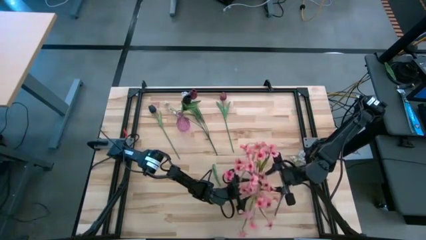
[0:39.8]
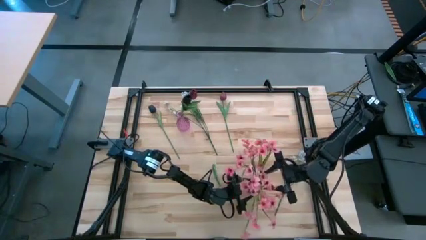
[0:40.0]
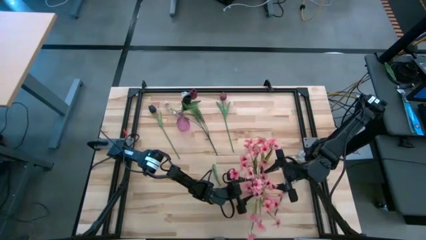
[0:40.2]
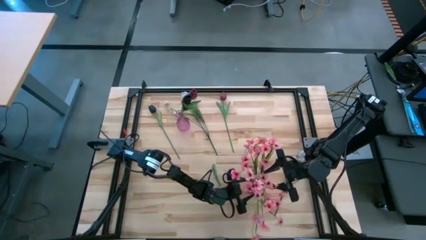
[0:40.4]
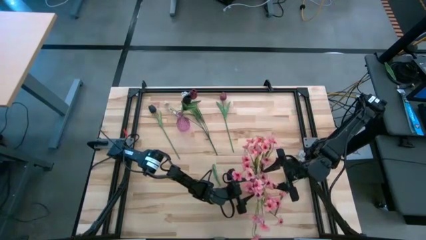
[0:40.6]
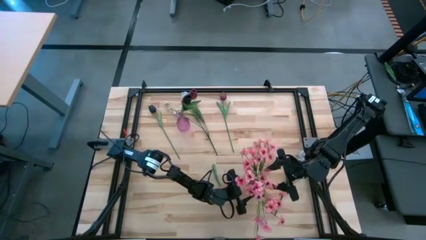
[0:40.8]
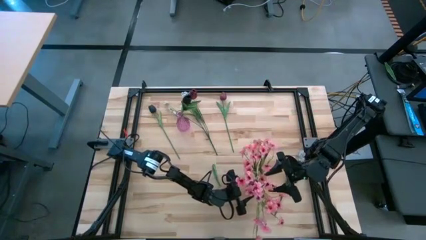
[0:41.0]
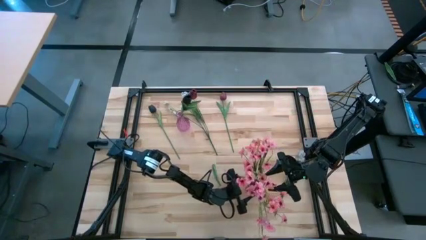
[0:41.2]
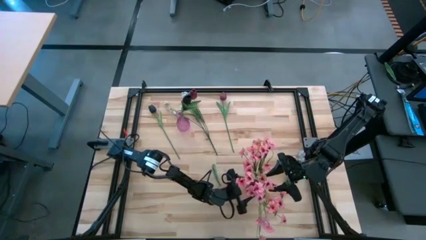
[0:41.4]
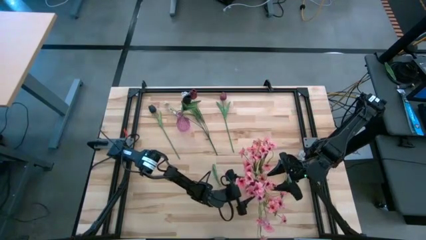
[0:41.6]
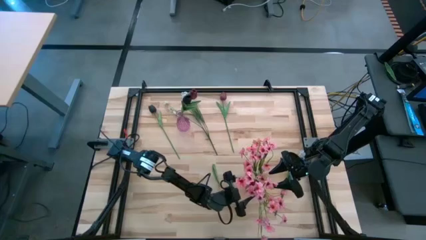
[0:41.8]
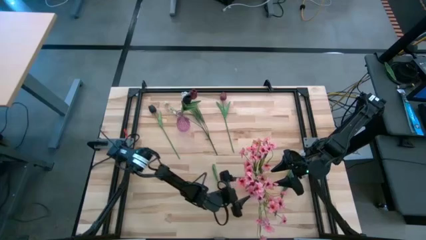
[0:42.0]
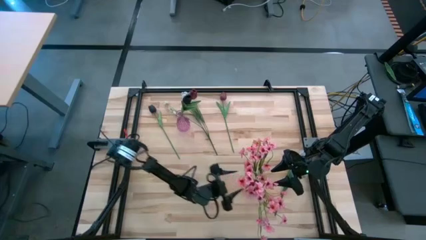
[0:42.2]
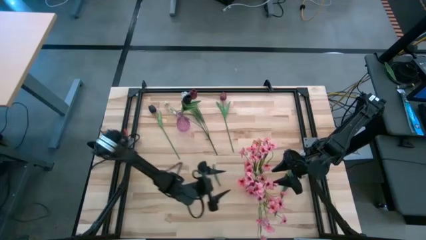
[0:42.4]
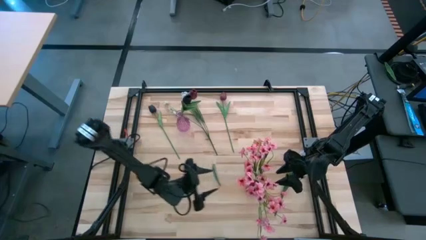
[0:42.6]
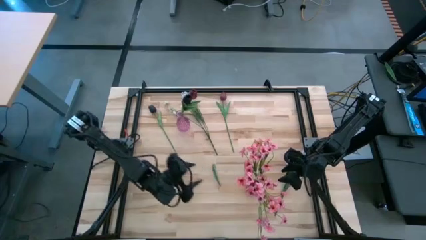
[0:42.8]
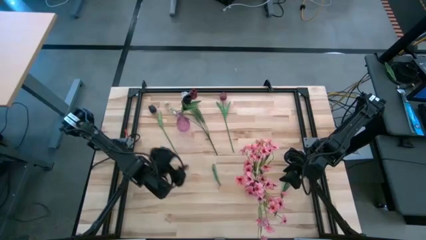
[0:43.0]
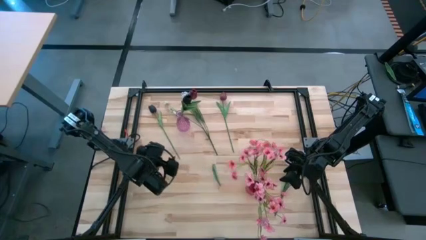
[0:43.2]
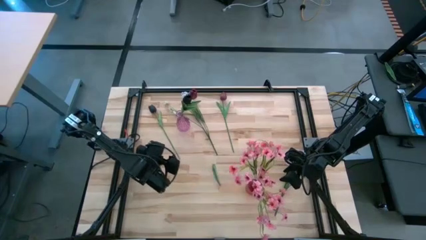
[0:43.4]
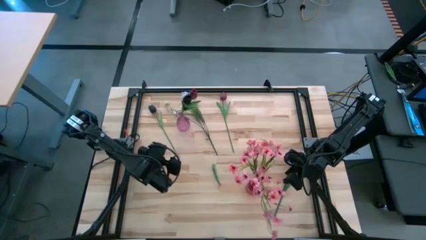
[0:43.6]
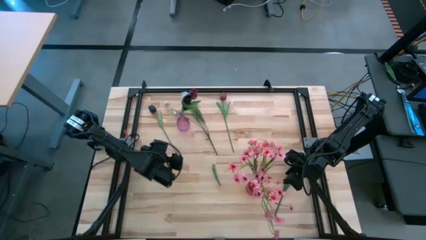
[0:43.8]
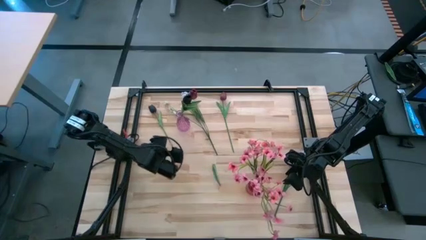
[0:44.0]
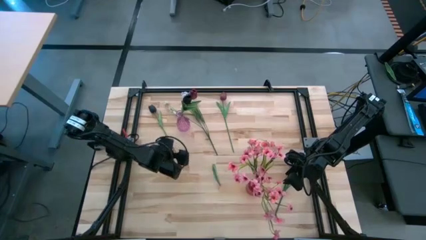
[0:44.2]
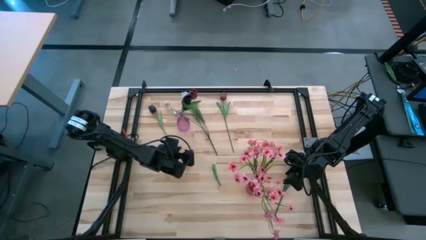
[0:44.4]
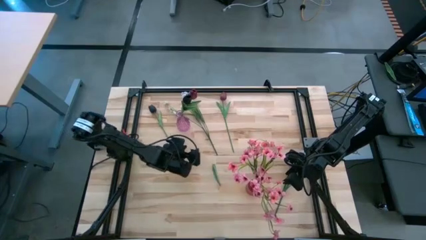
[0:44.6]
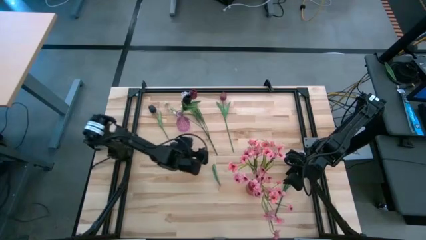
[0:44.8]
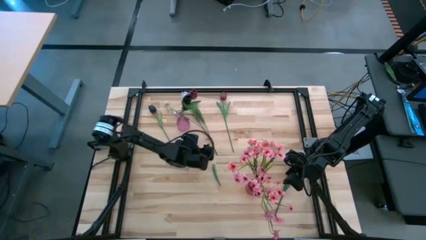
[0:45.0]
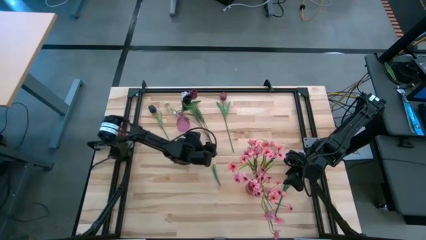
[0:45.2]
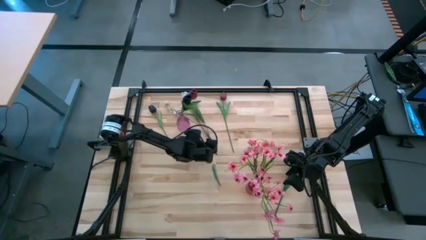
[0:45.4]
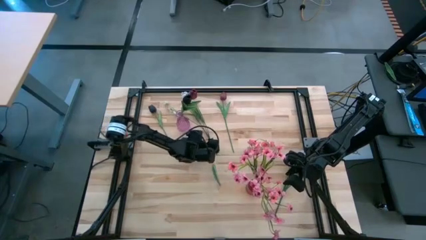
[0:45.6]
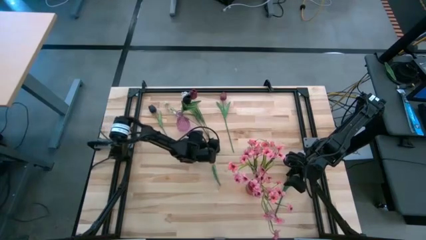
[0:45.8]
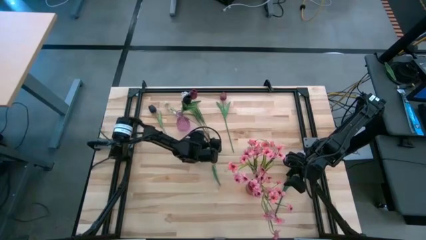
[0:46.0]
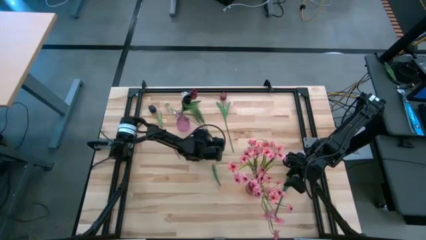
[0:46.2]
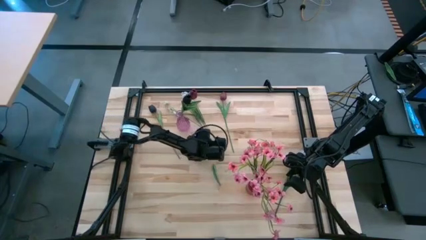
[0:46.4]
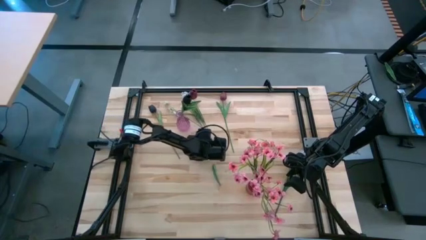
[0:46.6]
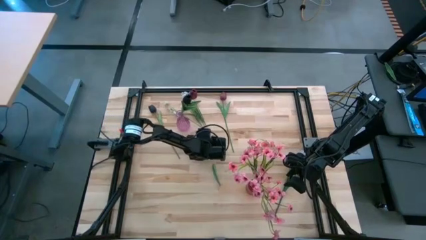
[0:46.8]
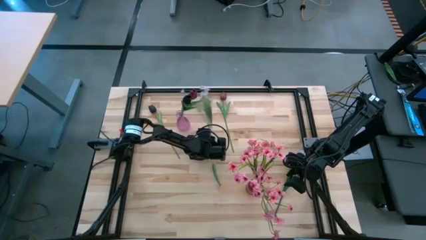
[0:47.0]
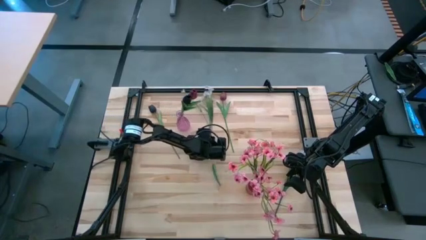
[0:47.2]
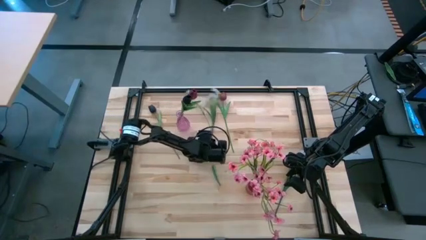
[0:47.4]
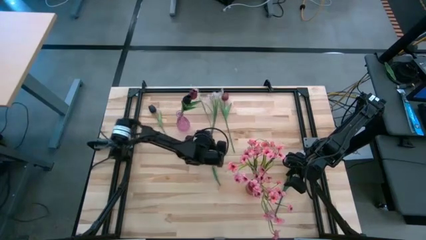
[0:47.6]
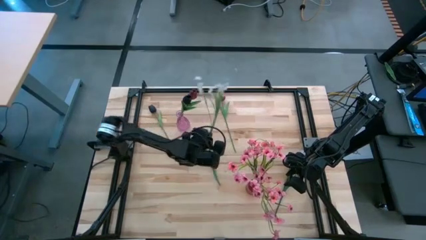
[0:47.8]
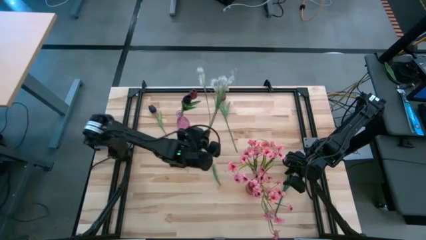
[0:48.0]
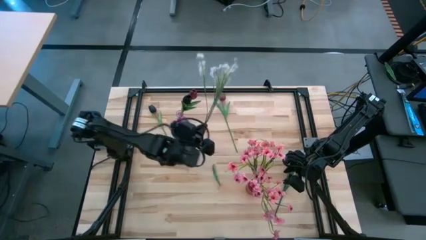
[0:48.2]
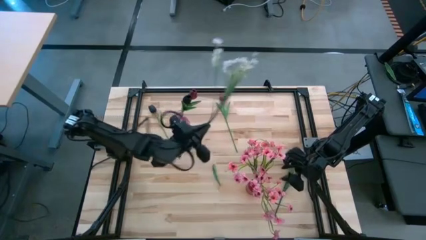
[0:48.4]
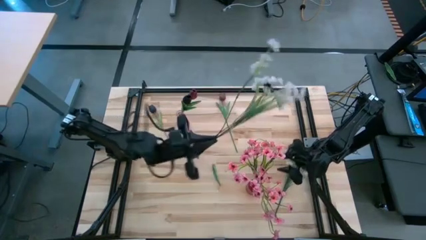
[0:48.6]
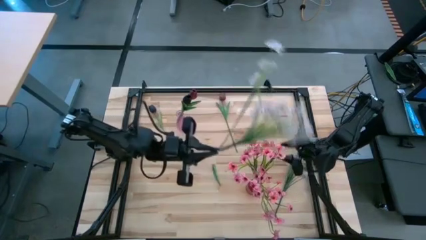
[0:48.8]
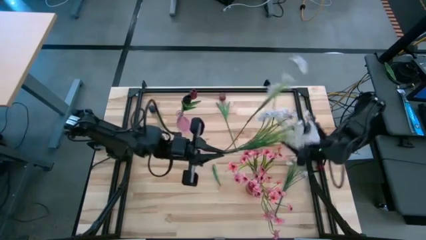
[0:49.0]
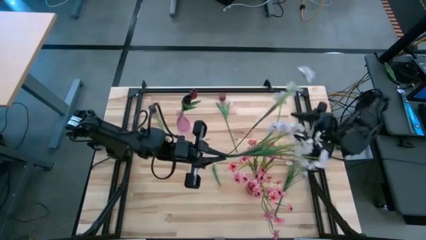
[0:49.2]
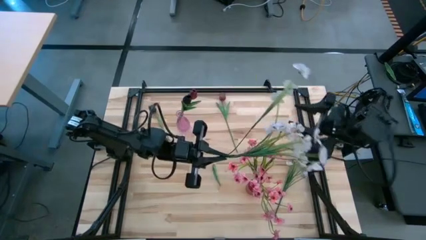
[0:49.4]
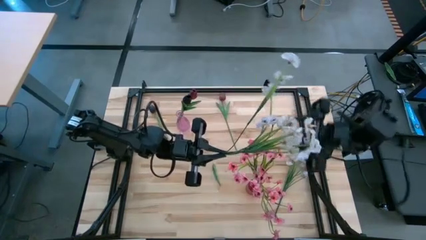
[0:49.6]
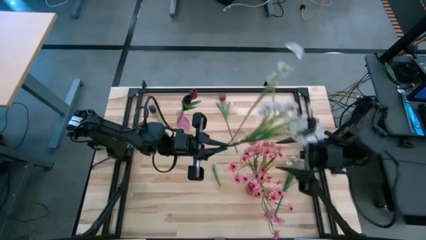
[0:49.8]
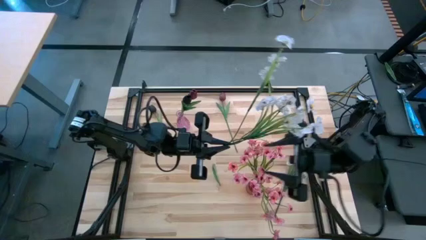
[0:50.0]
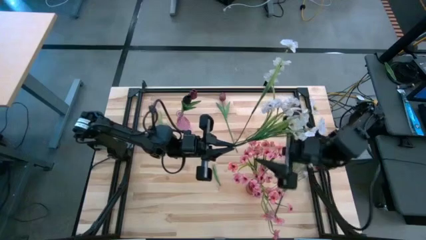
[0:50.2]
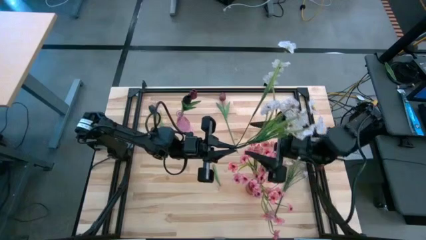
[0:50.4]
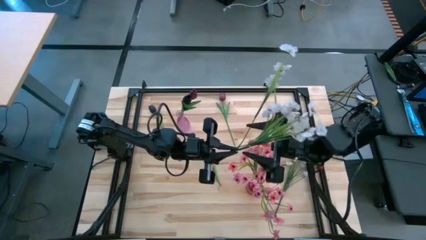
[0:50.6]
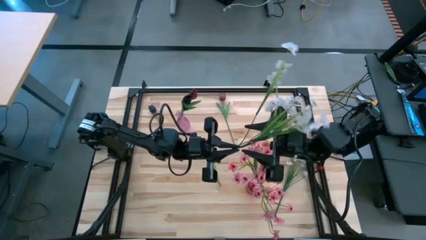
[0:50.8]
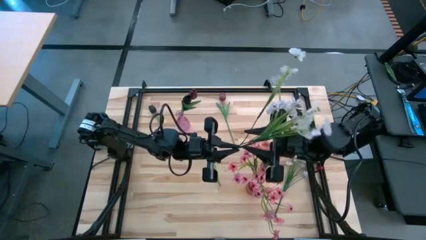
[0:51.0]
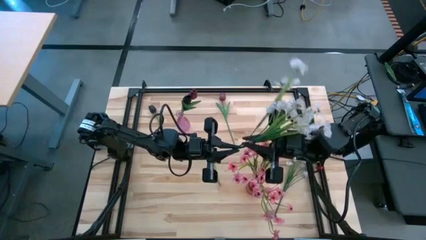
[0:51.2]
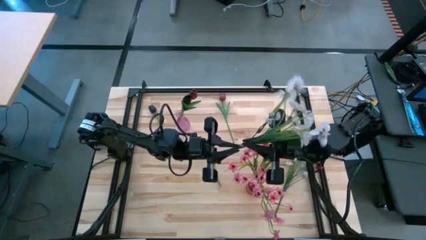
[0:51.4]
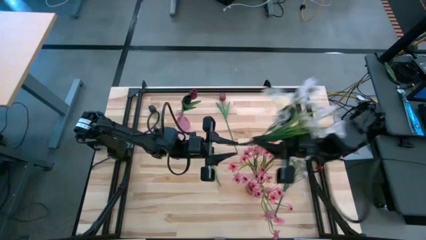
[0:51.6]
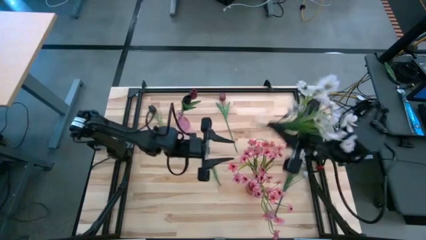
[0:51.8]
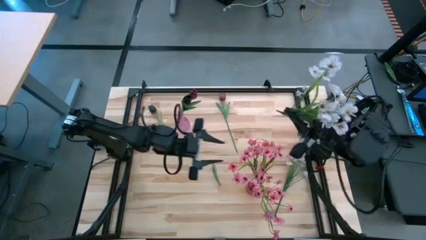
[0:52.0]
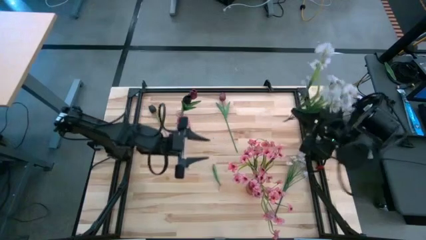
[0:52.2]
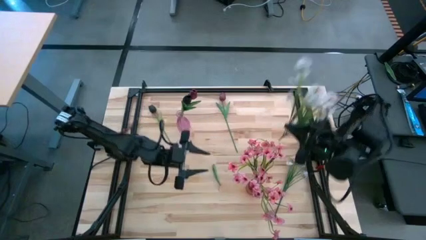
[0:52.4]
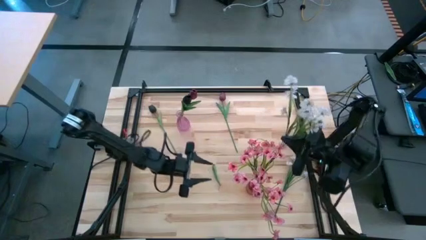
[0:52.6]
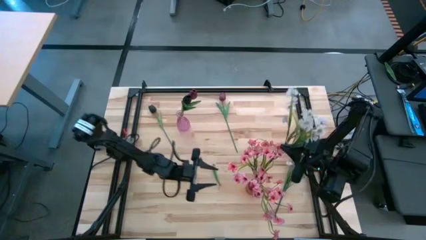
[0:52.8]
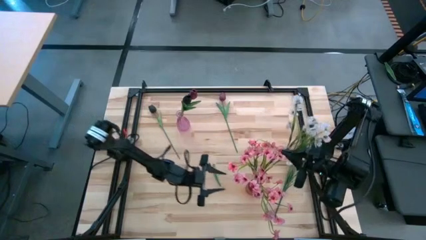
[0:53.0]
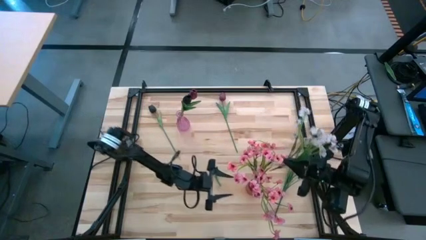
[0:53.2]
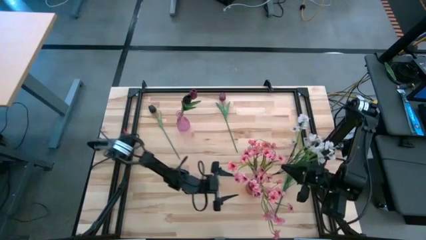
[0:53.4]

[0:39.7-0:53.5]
Task: Sort flowers into vase by color
Put the top white flowers into the red vase

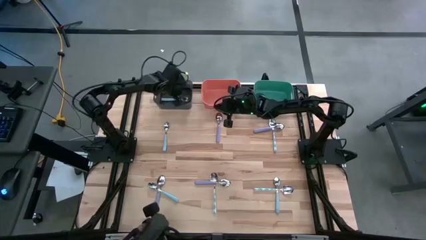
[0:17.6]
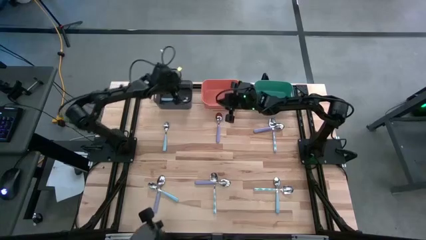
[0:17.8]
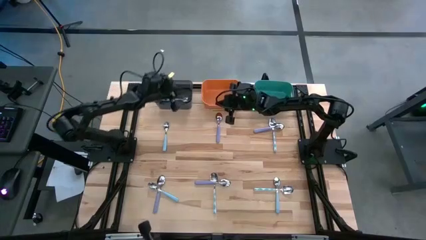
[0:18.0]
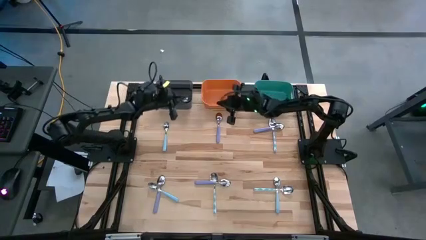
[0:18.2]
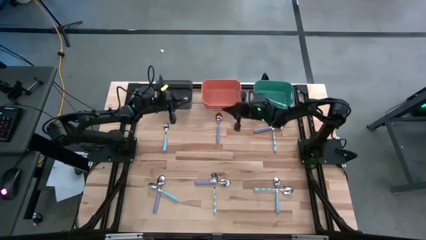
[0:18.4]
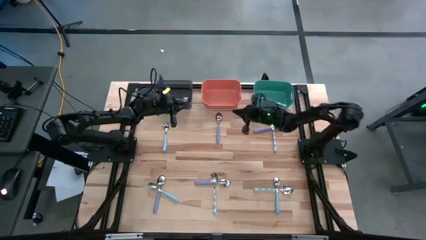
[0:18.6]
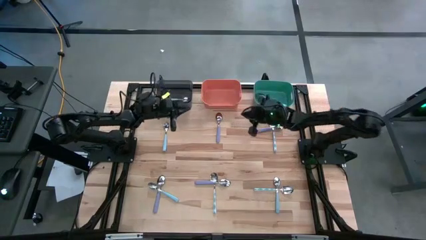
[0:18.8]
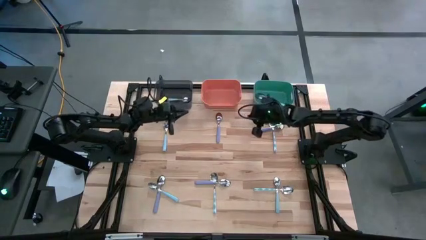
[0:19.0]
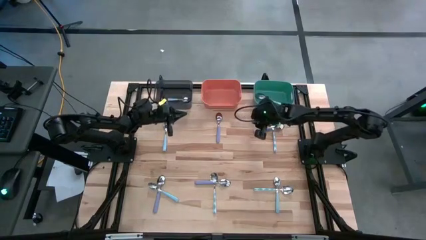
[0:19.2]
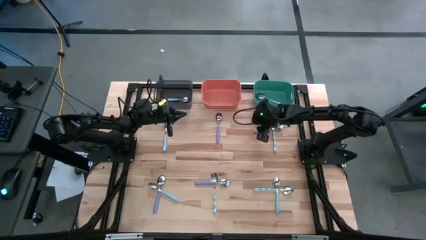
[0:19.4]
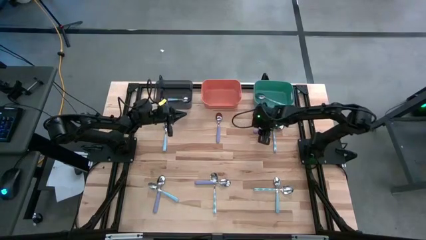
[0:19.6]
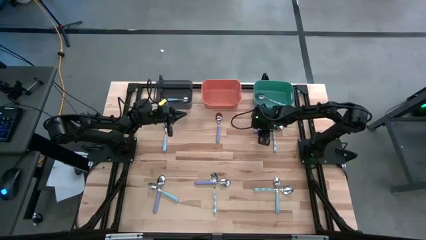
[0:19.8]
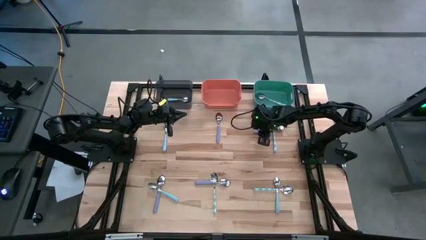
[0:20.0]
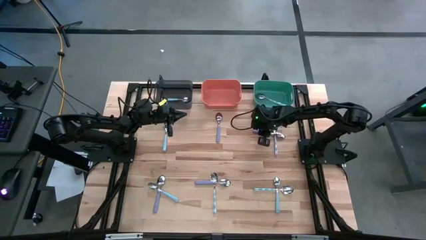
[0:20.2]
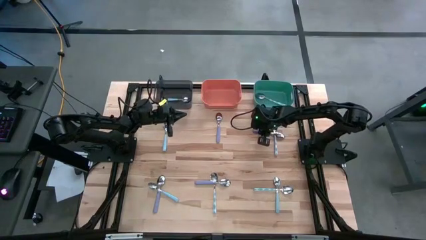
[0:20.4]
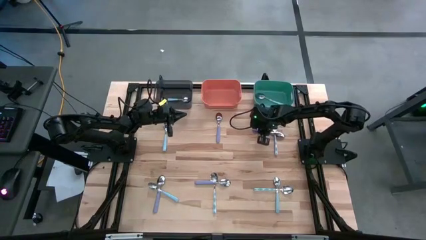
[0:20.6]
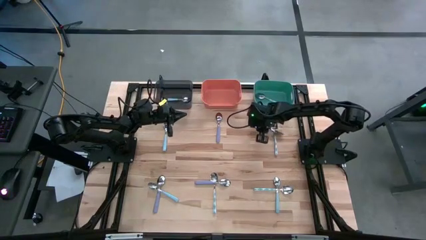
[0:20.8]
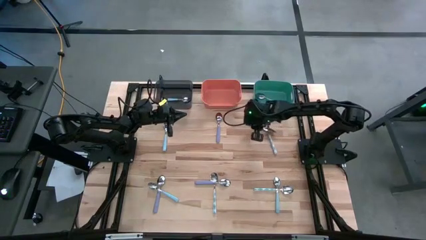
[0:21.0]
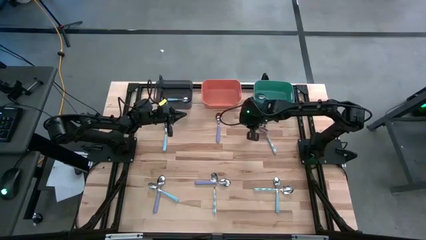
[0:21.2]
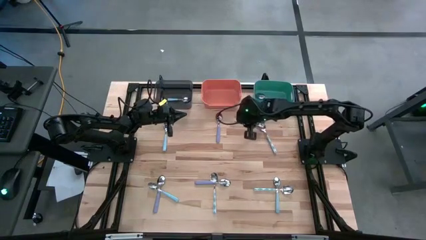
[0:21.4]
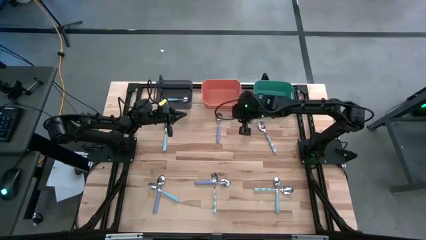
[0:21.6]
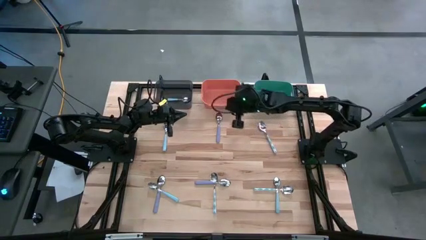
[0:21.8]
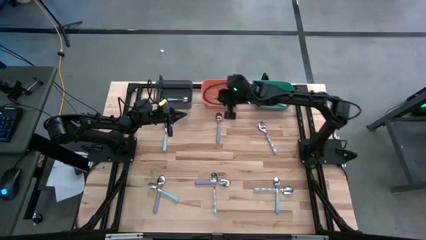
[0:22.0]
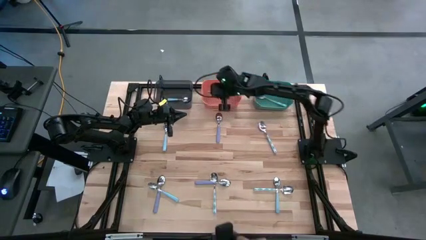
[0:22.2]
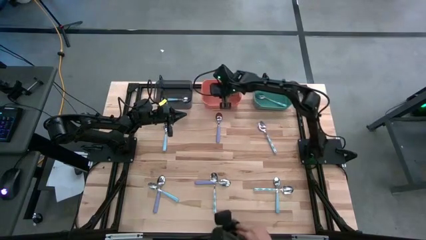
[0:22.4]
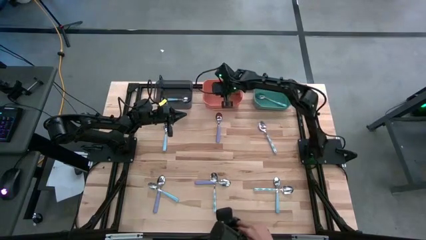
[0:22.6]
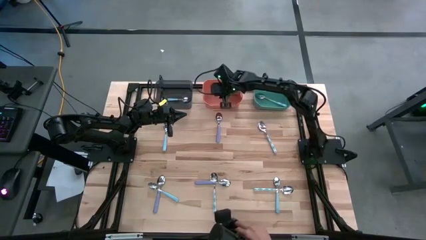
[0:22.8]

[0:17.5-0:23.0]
Task: Sort silverware by color (type)
Put the purple spoon into the orange bin
